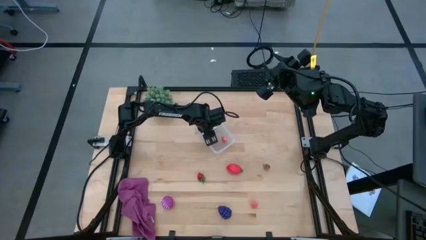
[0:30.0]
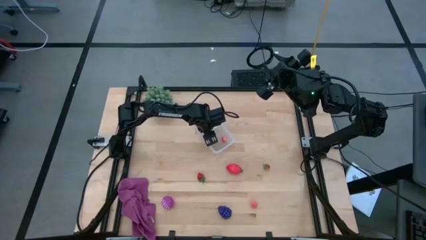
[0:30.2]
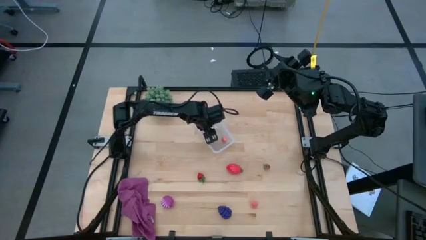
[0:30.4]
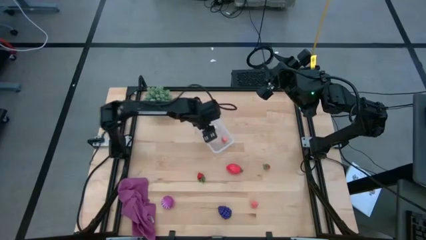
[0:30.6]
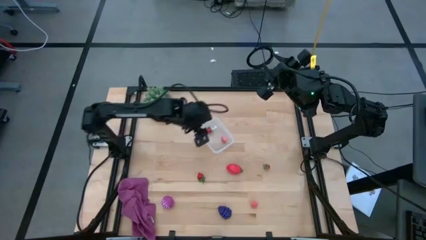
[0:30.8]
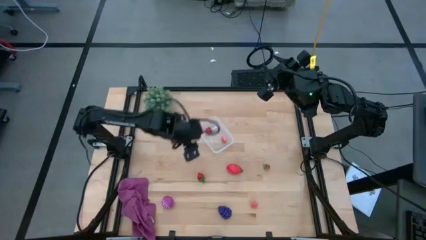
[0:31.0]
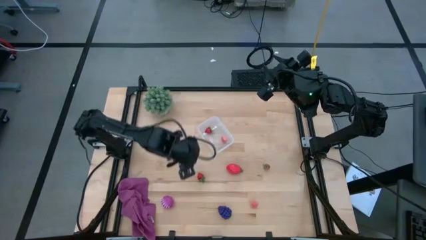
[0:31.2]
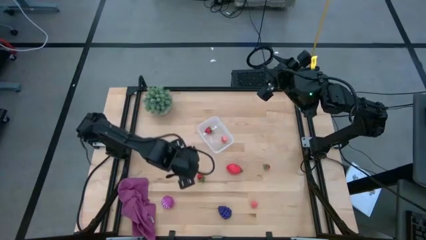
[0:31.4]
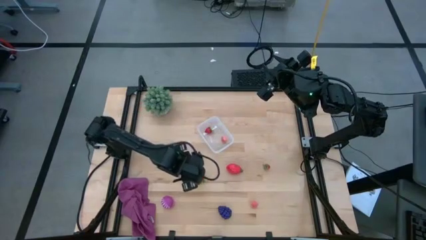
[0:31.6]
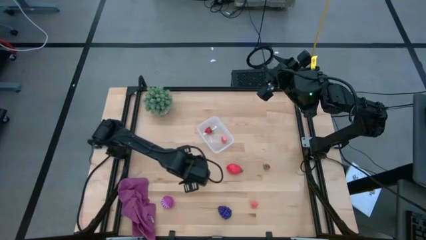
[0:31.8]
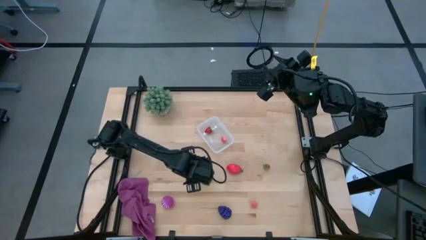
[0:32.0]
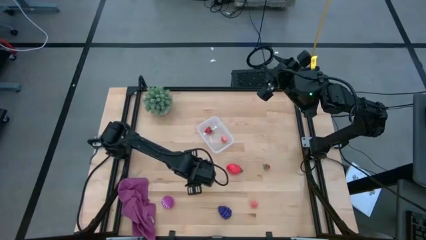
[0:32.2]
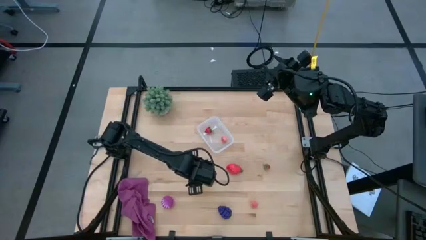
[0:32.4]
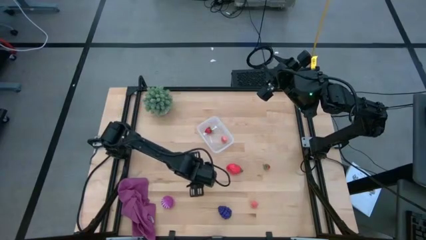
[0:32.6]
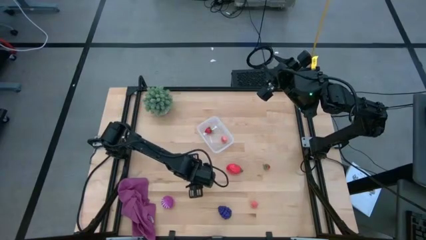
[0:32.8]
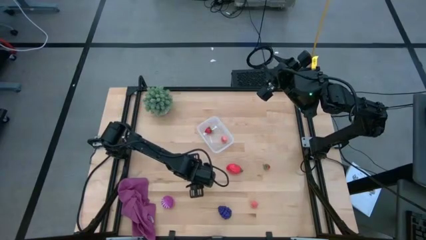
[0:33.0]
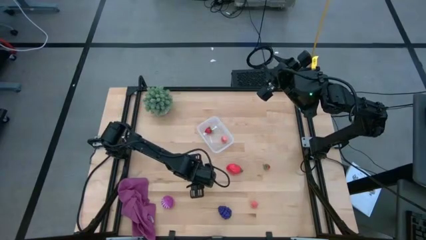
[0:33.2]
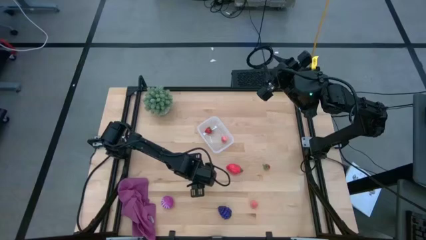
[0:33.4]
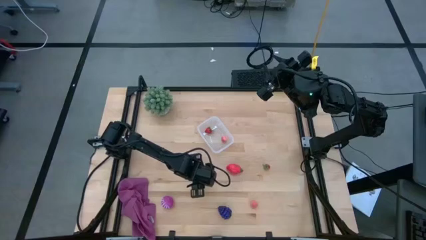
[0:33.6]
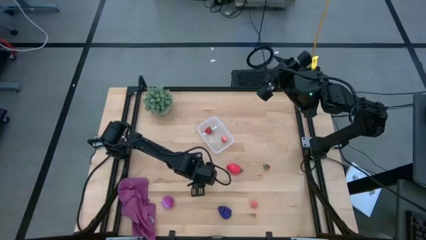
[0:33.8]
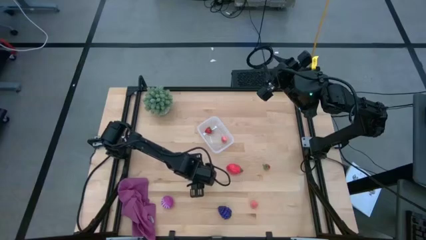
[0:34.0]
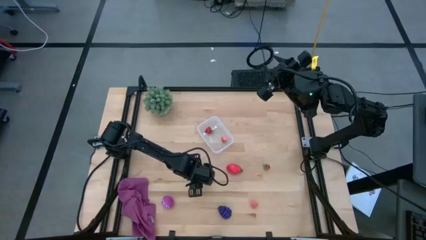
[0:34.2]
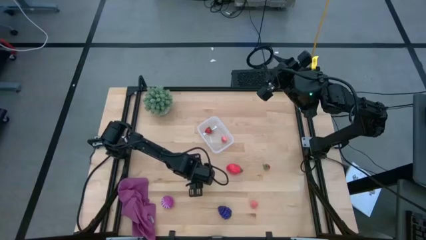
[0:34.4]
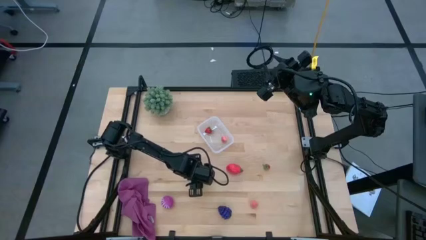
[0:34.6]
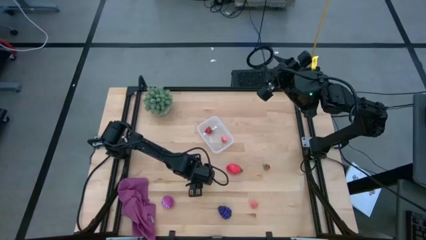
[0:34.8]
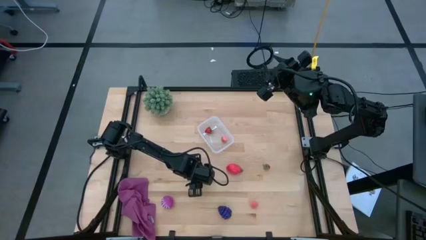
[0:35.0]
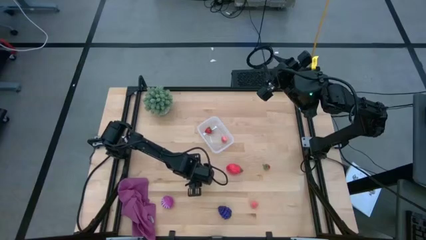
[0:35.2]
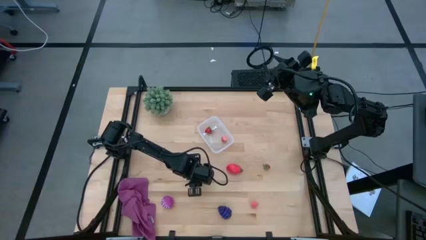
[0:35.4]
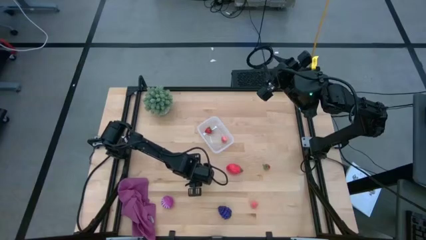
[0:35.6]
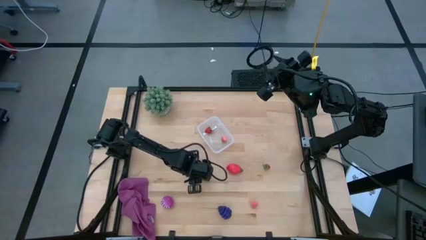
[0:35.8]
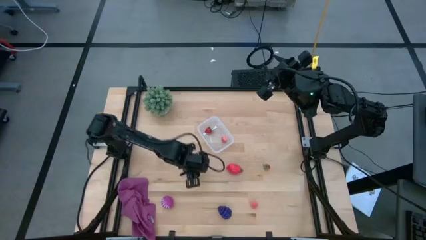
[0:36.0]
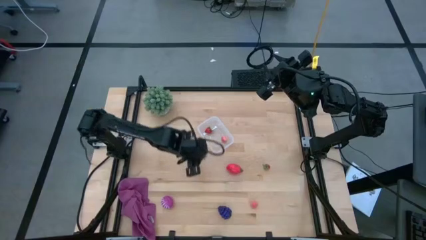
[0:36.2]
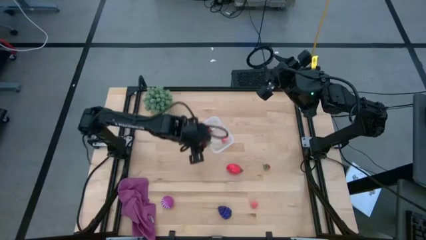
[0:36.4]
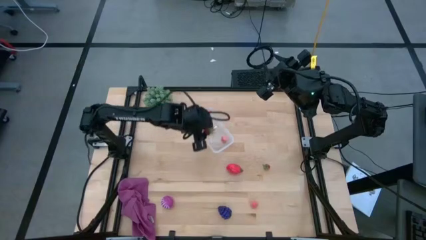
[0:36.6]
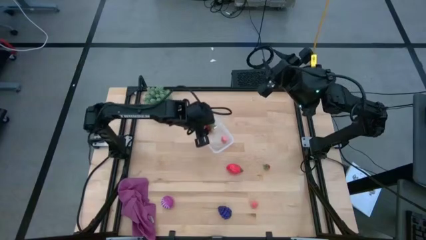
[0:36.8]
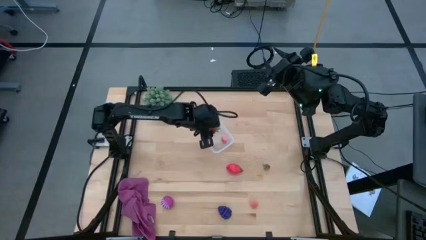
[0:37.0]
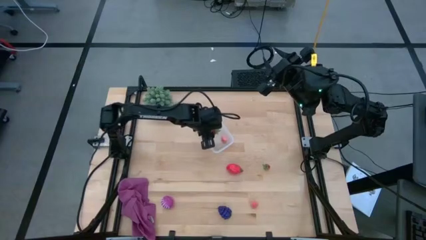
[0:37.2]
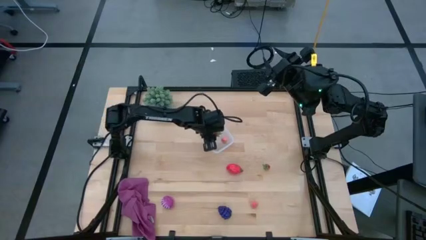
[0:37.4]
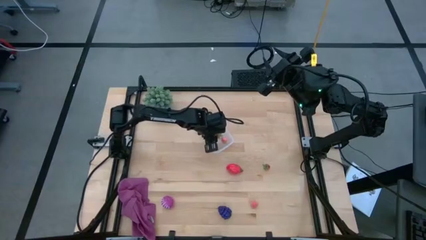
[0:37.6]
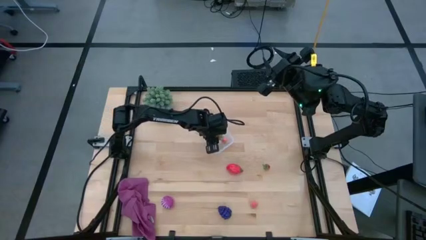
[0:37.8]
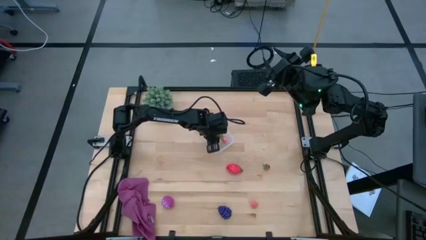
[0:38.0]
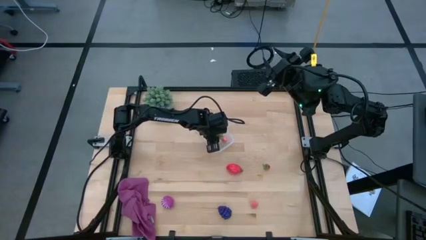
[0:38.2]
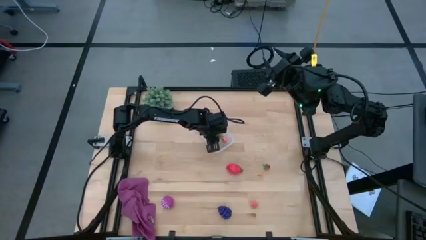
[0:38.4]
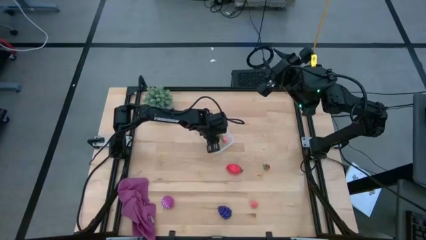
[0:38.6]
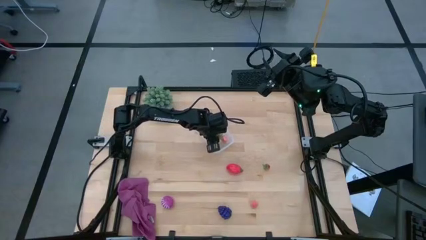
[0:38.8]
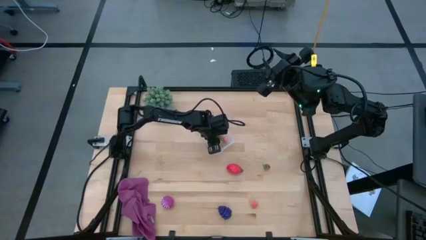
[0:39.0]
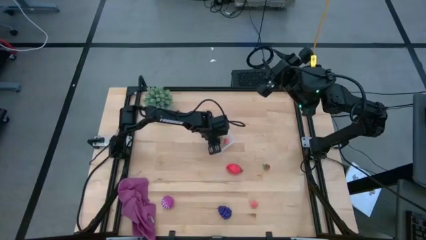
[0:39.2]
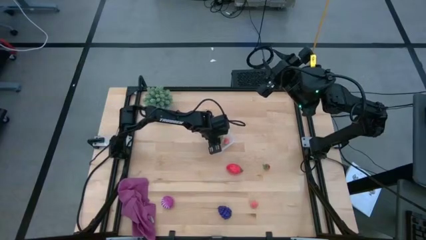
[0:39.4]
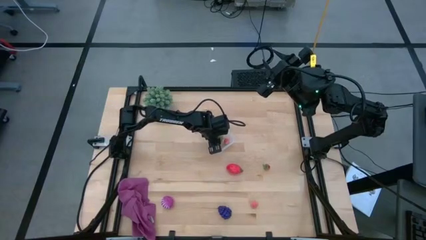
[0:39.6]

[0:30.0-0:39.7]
Task: Pick and placing Produce into tupperware
Put the left strawberry into the transparent bin

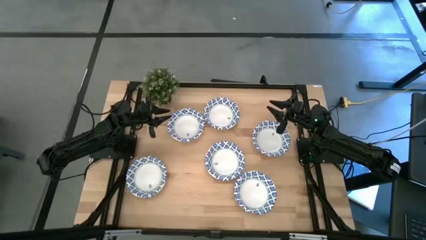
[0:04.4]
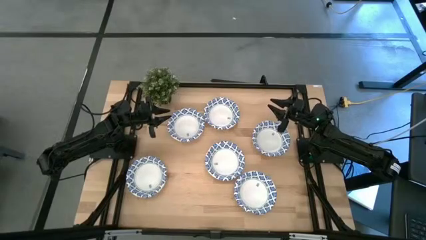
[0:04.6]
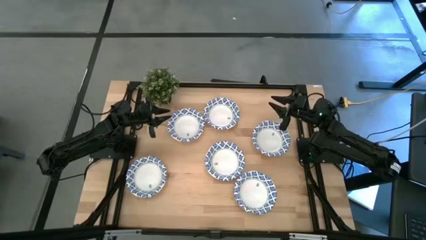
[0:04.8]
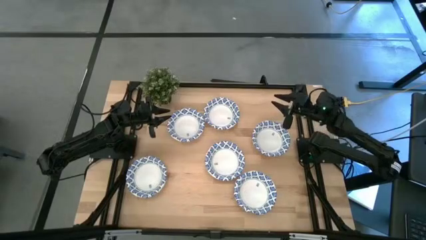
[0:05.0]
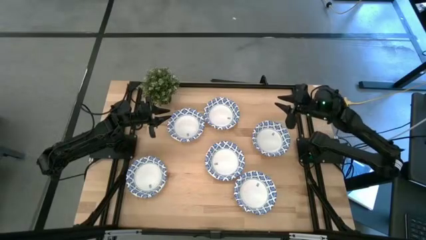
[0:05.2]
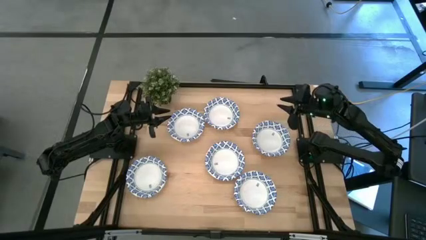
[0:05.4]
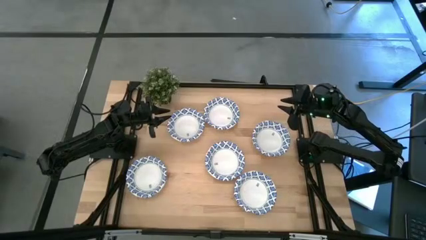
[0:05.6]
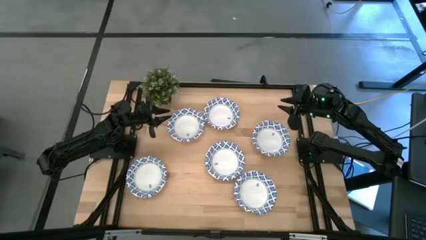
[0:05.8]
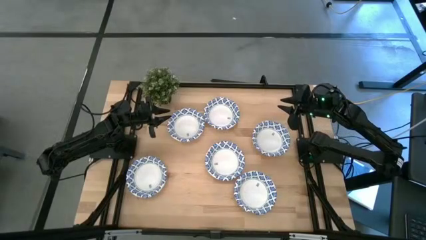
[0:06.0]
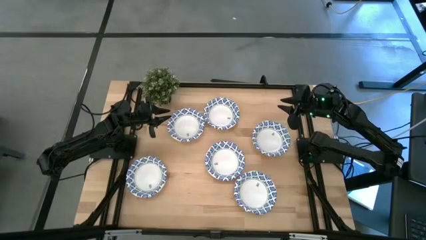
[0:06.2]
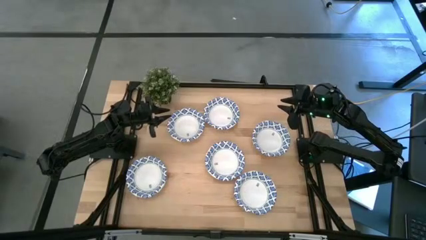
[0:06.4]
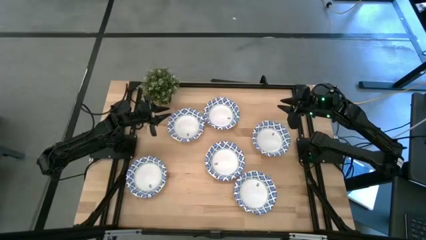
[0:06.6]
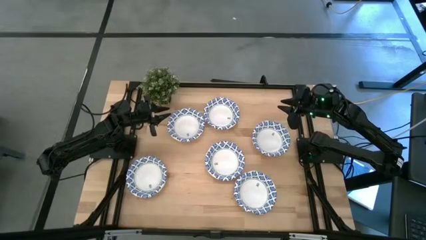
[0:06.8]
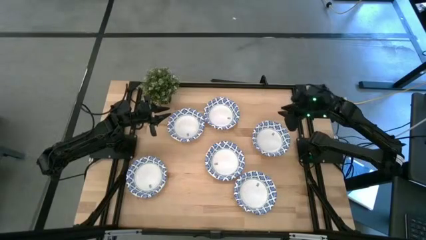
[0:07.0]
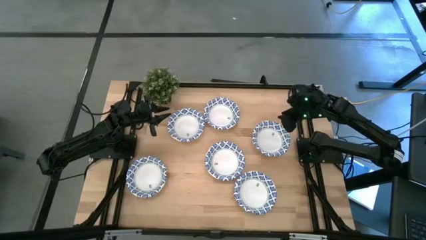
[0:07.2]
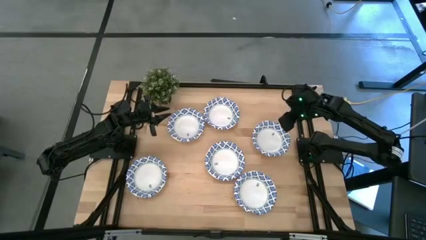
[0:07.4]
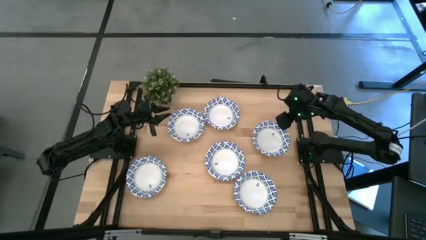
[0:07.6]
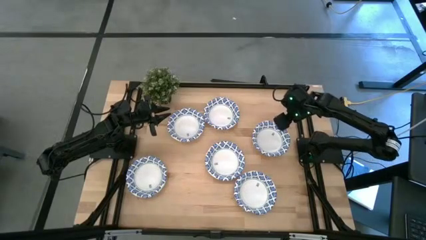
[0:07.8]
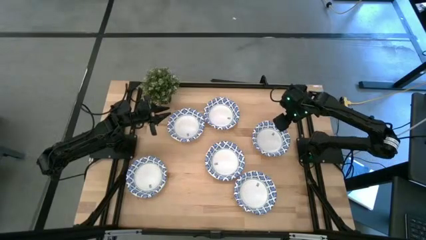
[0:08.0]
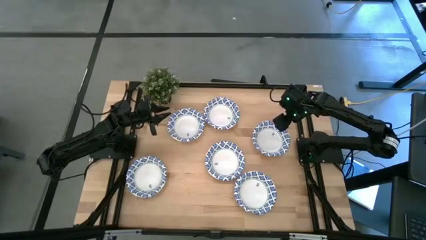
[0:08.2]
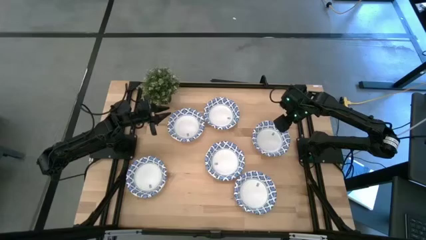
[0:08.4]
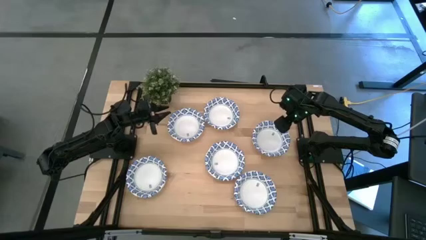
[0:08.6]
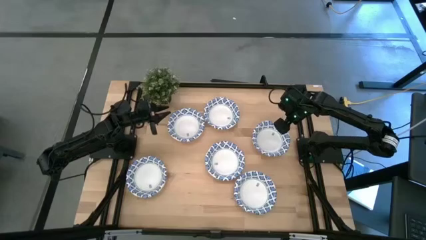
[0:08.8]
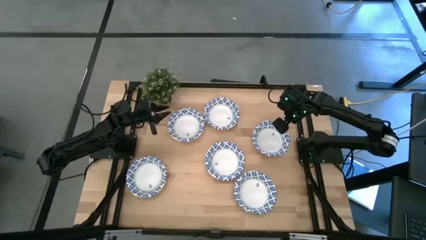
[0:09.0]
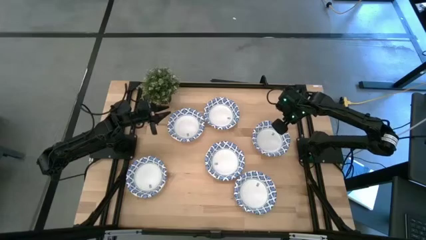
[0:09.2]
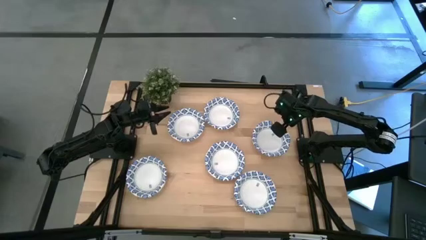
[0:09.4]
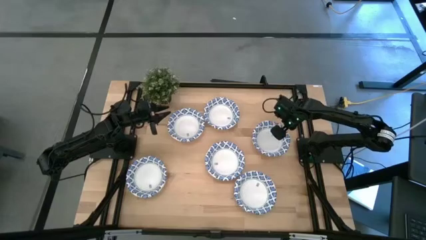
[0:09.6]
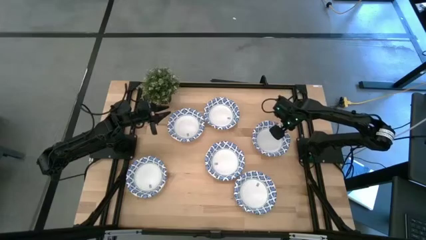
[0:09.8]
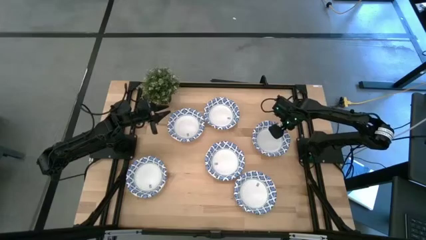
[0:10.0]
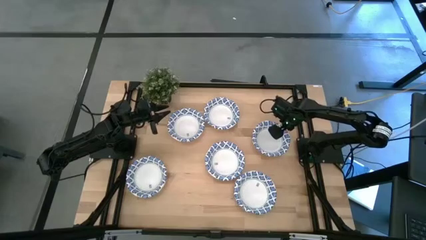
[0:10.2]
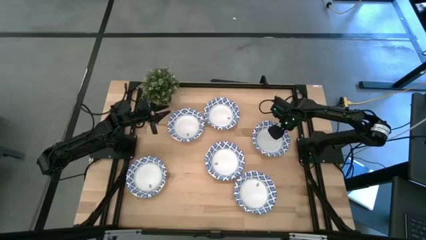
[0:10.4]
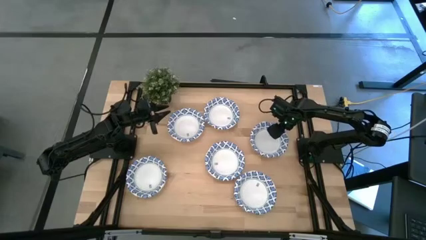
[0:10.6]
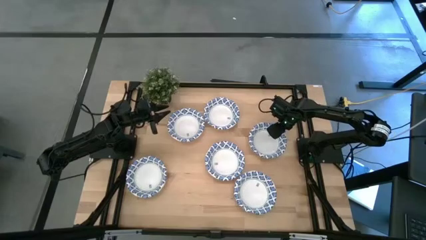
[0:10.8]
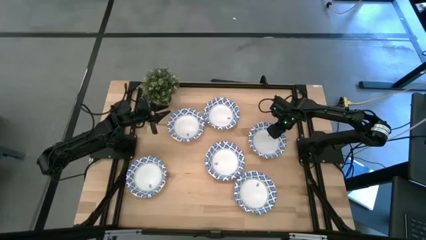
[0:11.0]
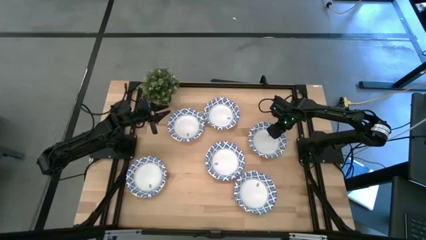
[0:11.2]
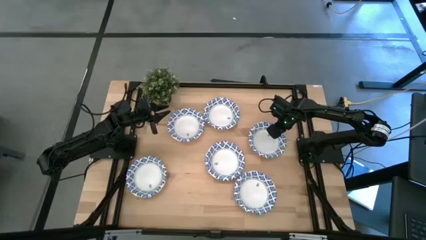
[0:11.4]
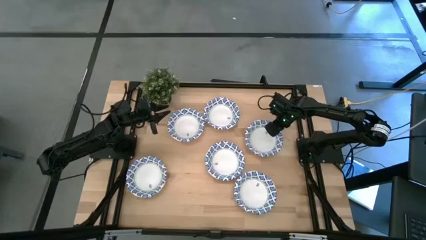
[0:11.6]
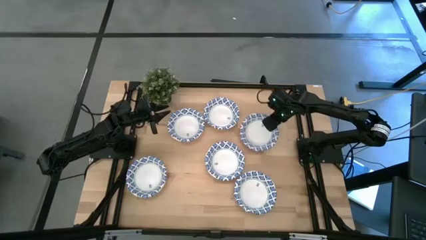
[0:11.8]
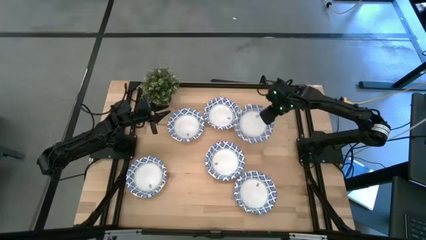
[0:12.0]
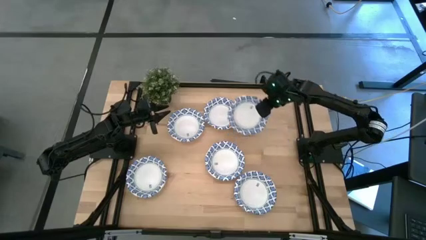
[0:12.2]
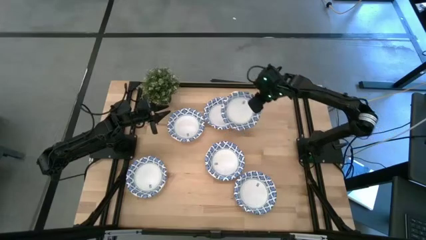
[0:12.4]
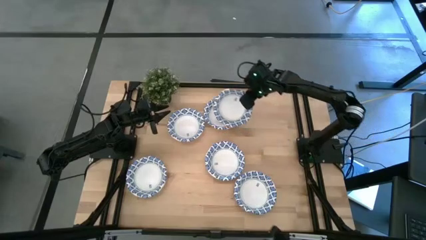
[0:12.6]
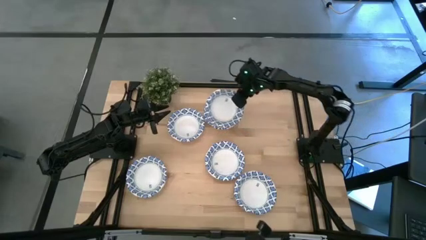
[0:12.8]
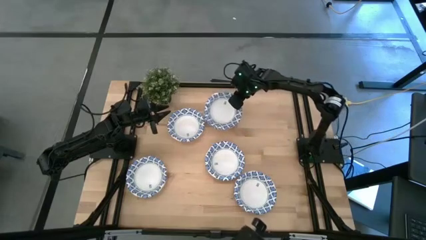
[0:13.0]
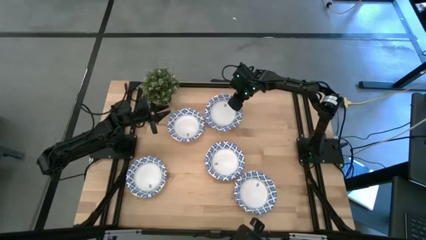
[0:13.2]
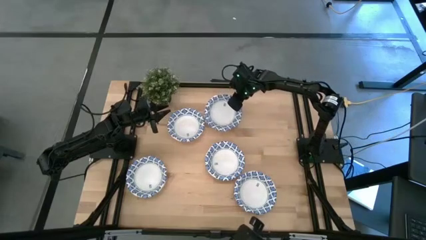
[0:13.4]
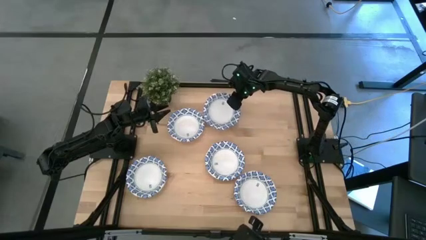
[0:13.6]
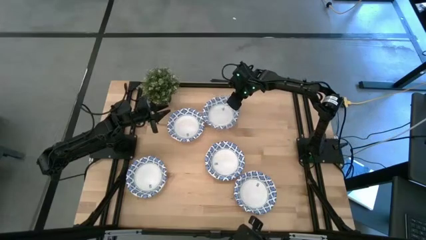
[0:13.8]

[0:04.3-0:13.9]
Task: Nest bowls inside each other
Stack the white bowl on the white bowl
